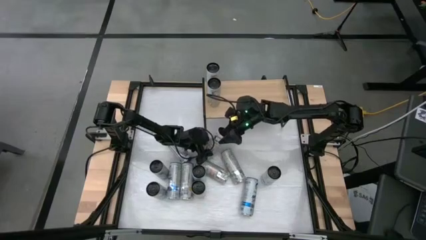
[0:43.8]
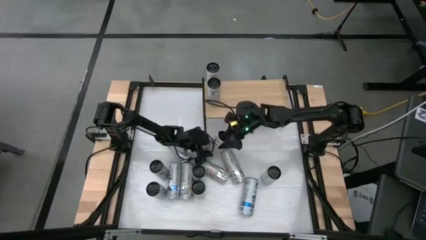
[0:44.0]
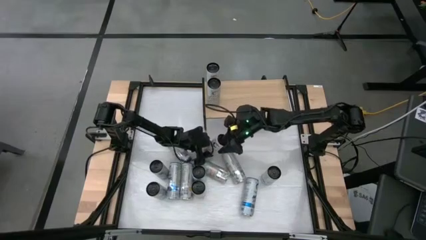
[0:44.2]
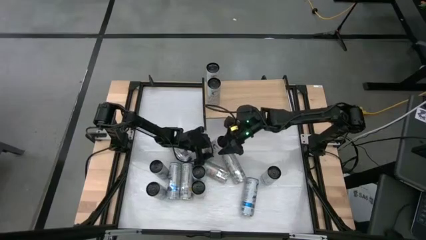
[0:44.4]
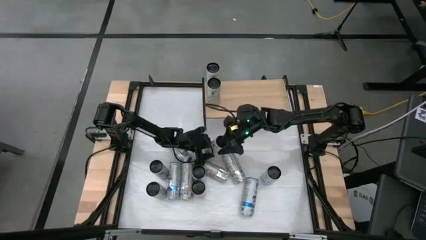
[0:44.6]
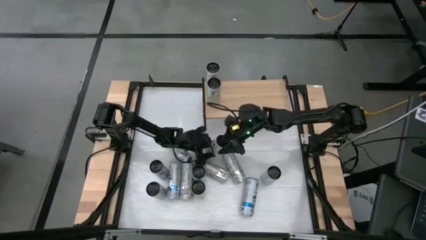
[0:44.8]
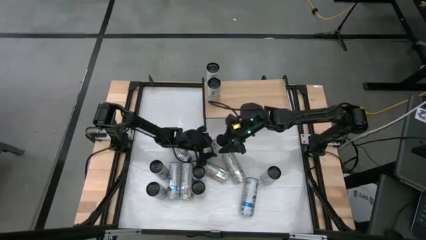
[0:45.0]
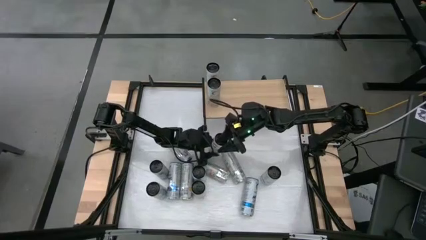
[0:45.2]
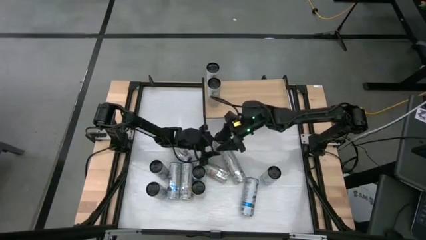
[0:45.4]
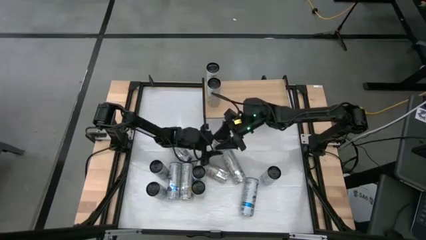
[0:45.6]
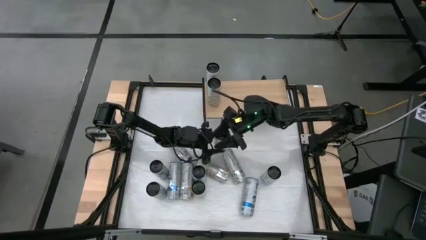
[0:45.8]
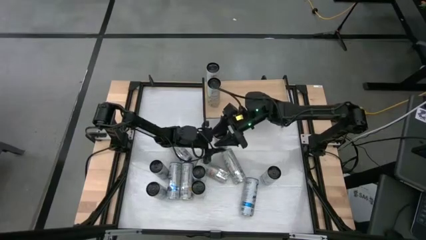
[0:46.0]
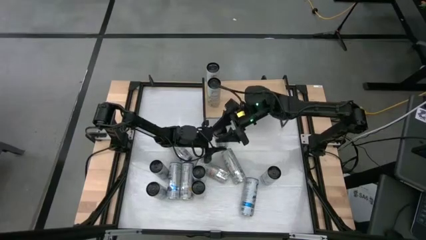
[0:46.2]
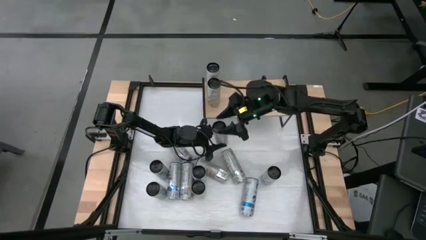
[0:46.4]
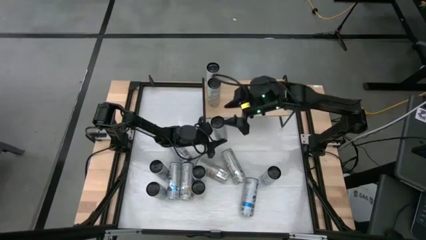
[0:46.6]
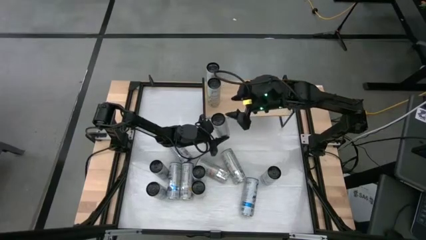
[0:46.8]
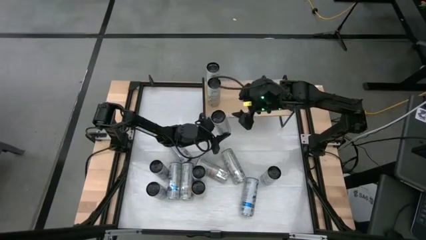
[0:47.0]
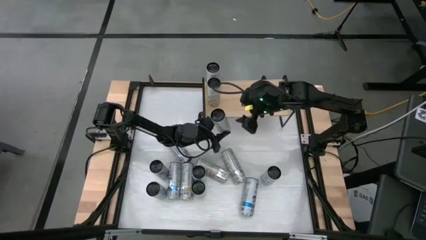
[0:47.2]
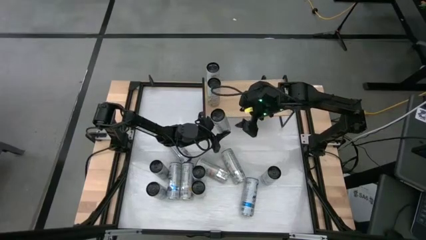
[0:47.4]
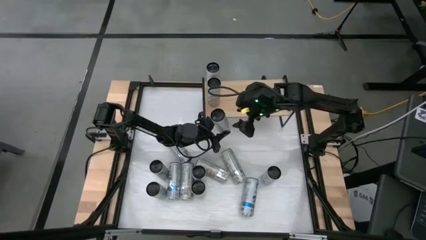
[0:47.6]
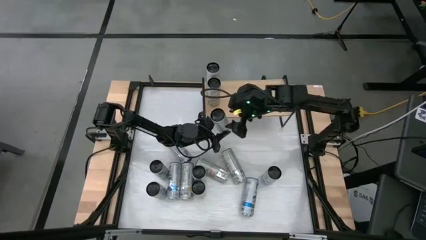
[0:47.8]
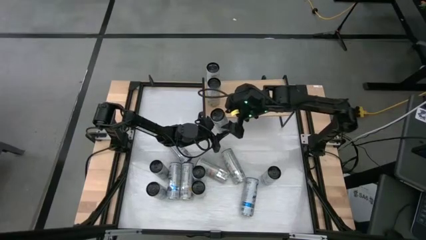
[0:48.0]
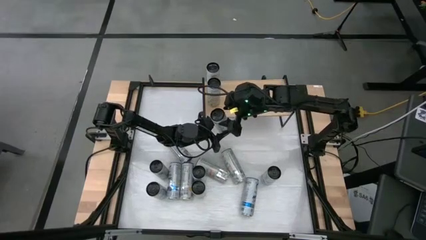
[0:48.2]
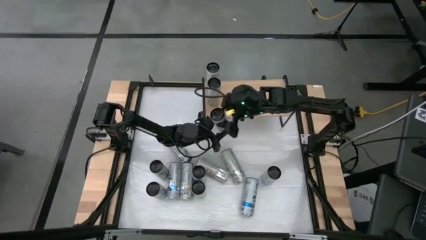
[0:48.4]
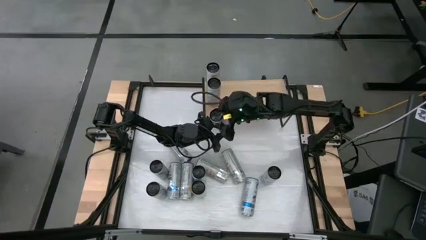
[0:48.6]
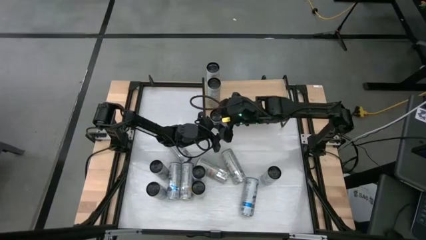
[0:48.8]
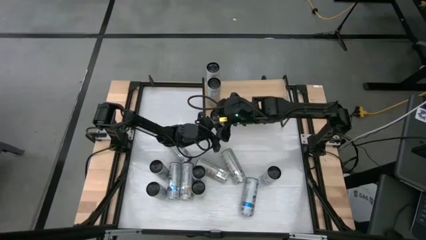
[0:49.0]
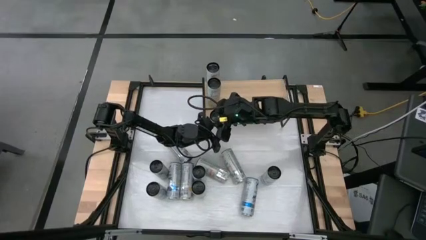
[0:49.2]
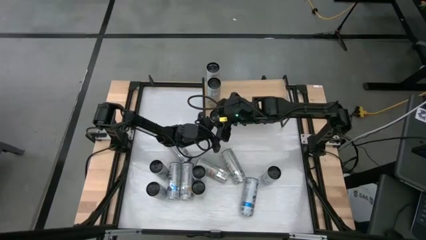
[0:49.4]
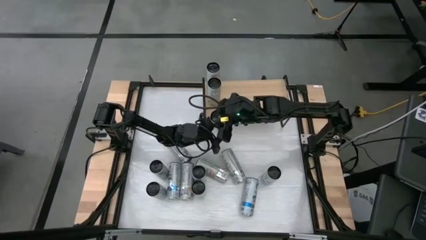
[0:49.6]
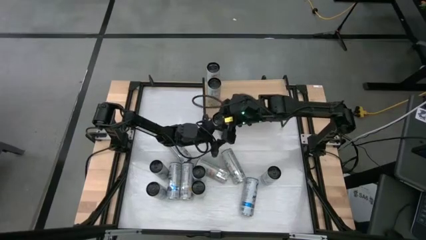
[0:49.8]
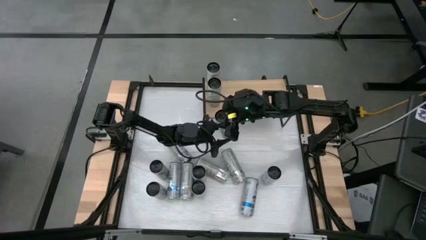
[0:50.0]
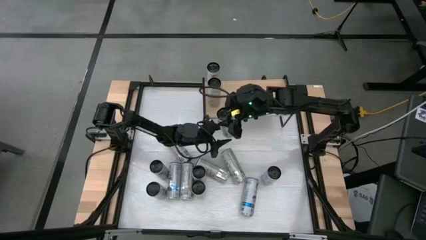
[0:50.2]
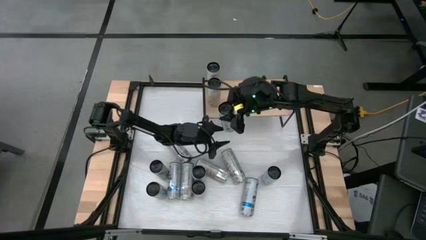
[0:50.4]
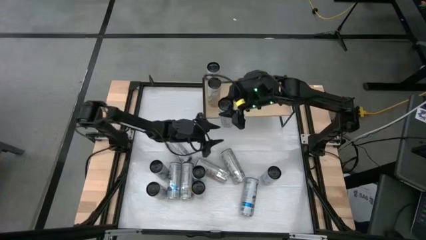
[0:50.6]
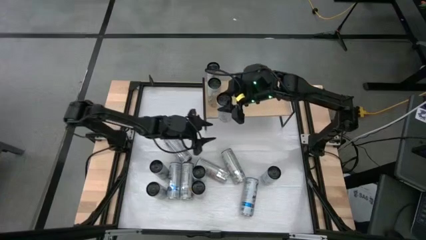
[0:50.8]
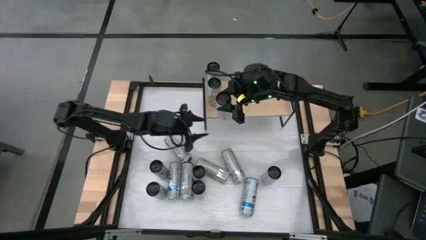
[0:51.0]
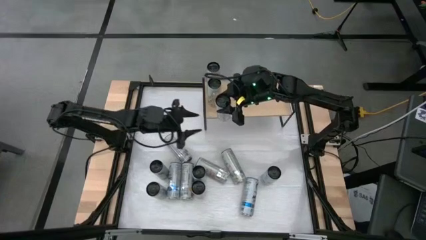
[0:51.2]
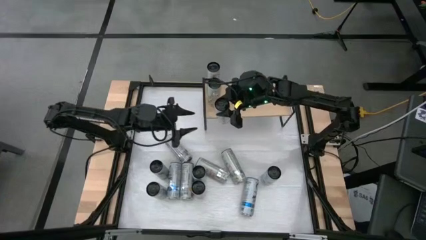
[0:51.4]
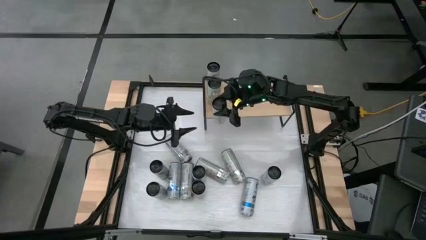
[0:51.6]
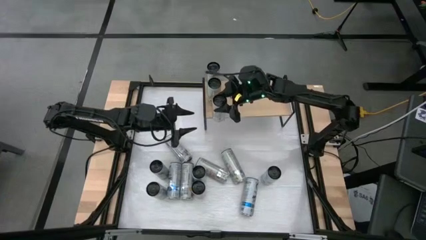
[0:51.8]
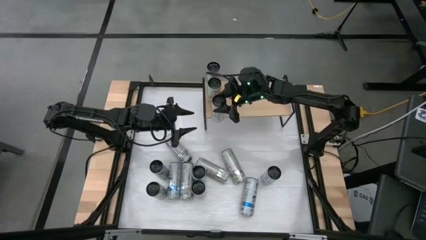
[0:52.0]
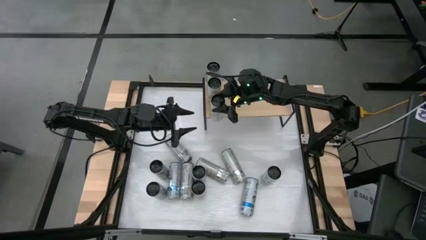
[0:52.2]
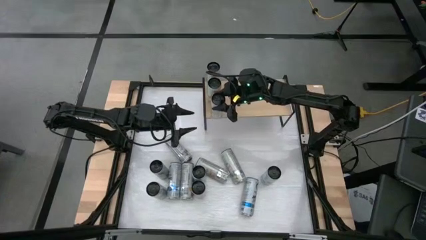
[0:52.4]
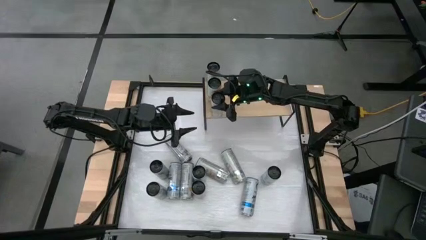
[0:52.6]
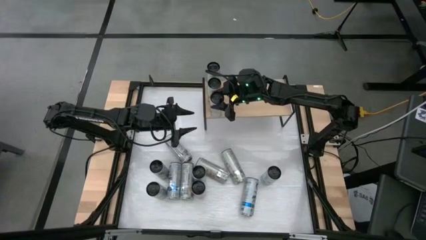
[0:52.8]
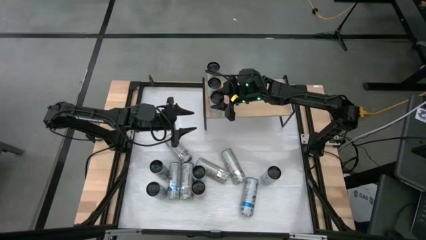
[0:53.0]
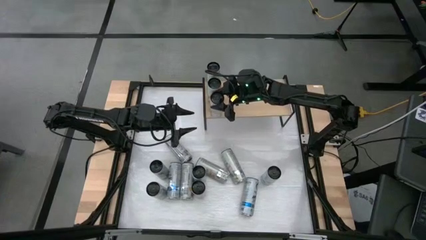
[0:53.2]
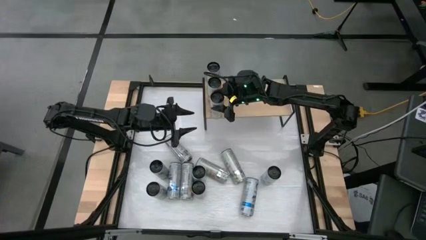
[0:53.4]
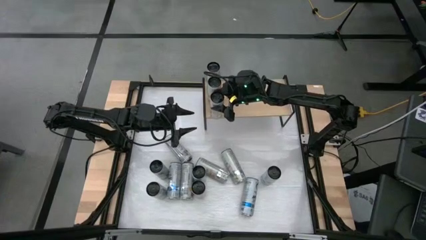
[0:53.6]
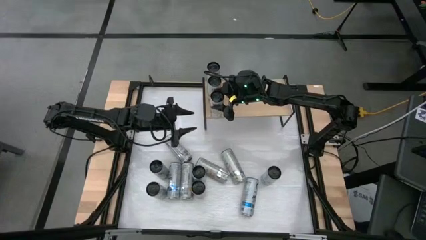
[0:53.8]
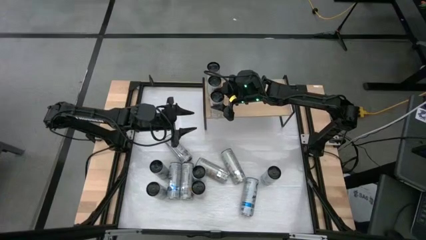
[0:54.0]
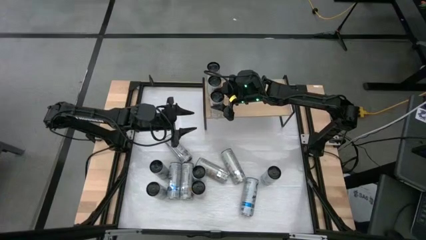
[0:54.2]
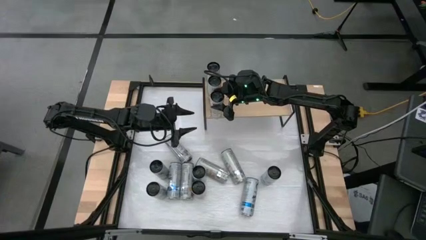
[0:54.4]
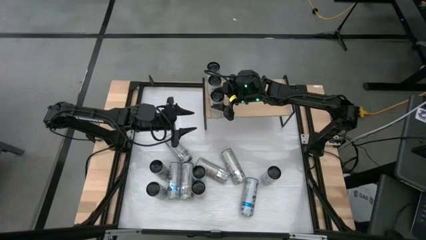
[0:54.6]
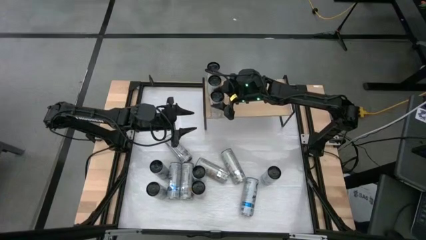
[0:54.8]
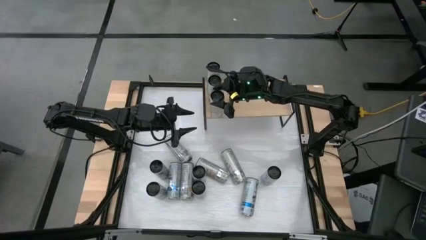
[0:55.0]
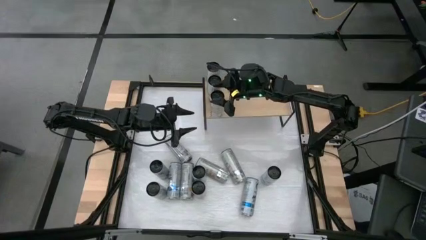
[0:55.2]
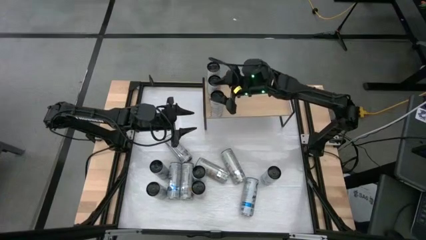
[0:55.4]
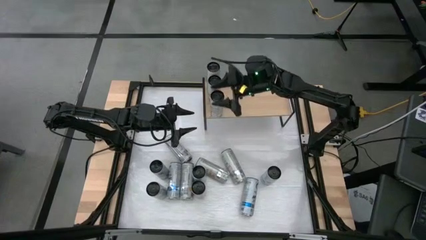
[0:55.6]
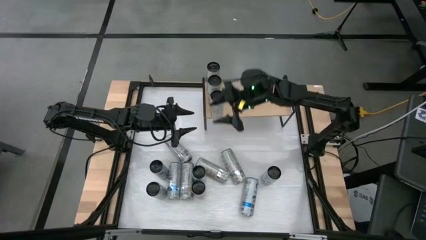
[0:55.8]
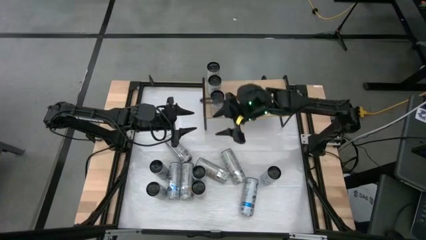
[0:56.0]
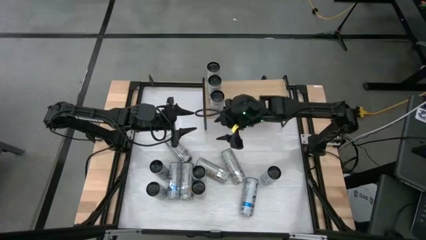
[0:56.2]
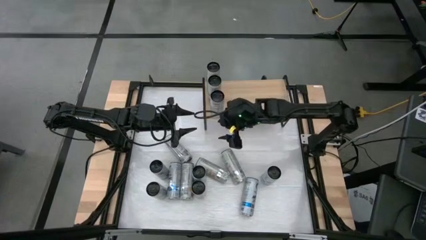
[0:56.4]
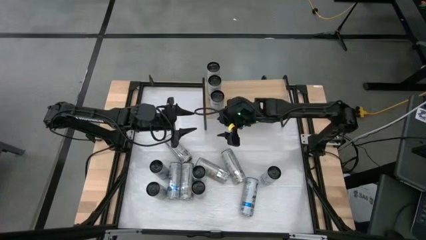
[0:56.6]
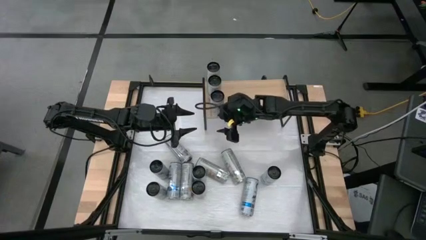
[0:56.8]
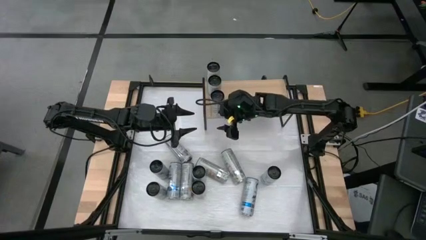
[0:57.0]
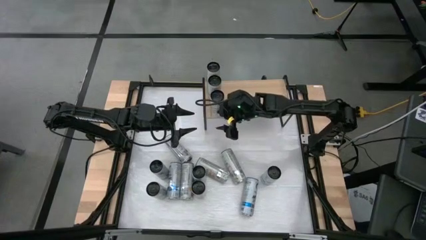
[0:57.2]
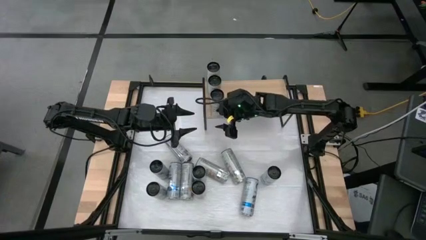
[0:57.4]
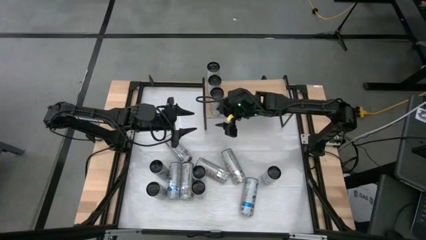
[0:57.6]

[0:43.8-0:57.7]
Task: Place canned beverage on shelf
Put the right orange soda can on the shelf aligned with the other orange soda cans
